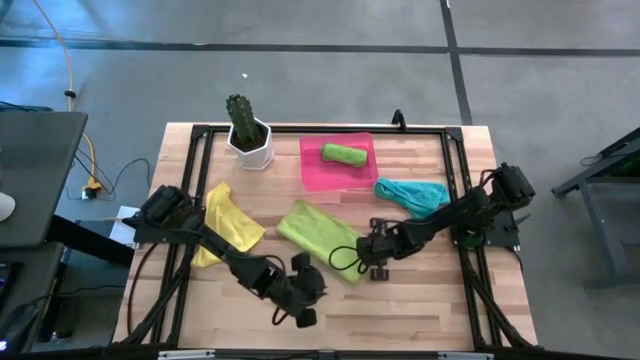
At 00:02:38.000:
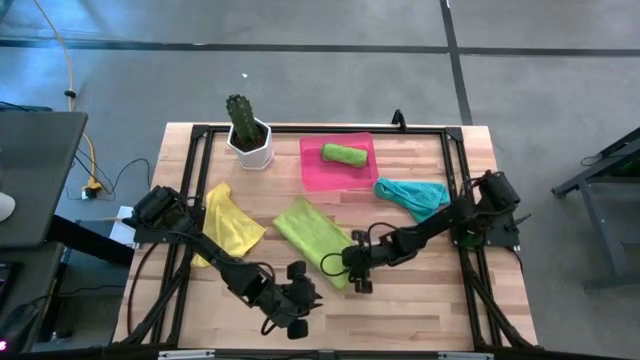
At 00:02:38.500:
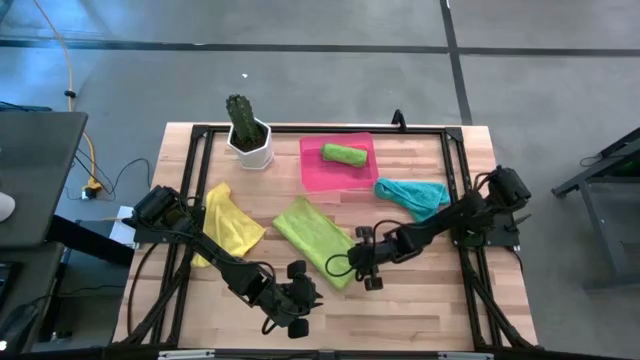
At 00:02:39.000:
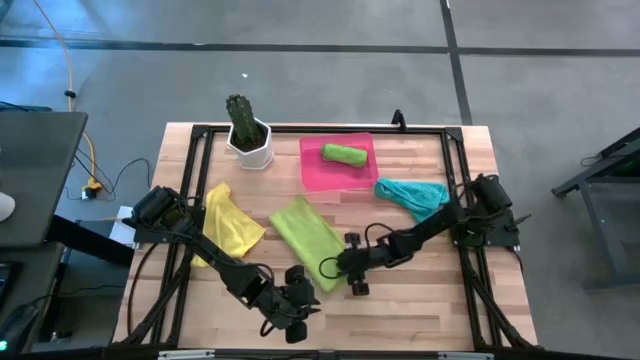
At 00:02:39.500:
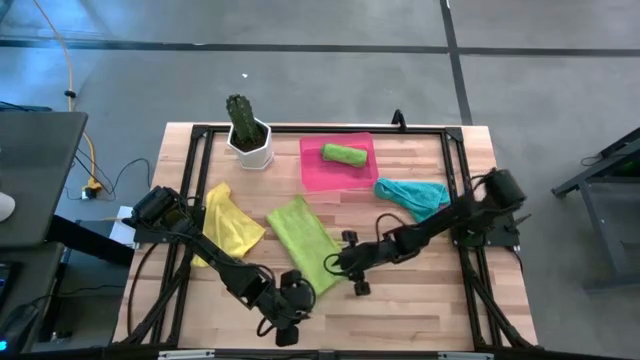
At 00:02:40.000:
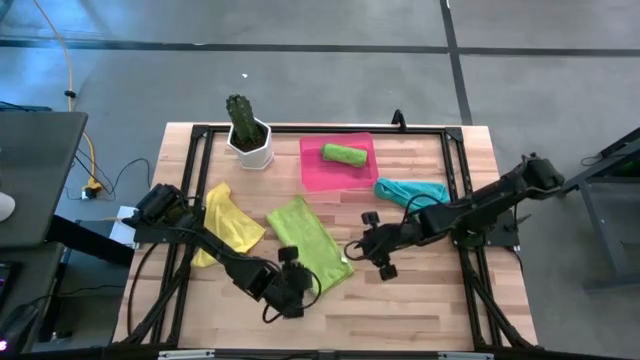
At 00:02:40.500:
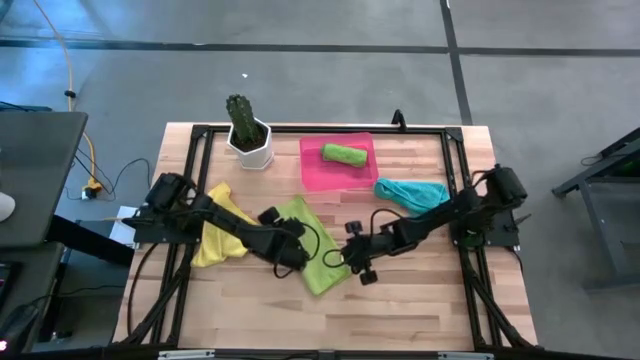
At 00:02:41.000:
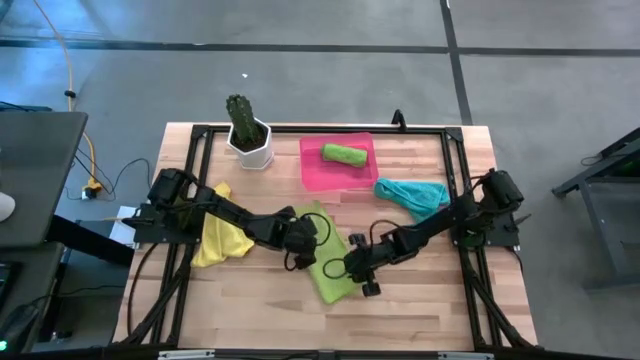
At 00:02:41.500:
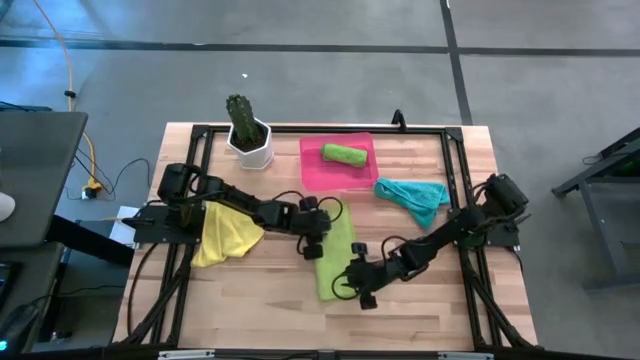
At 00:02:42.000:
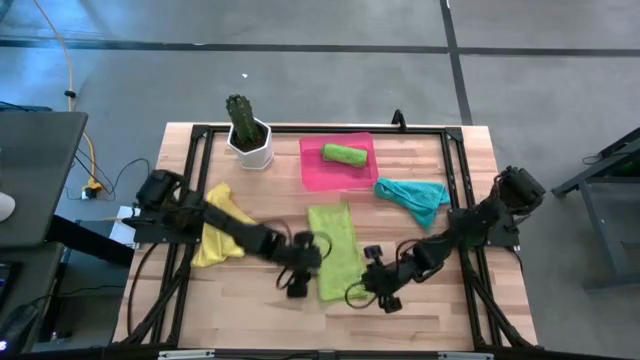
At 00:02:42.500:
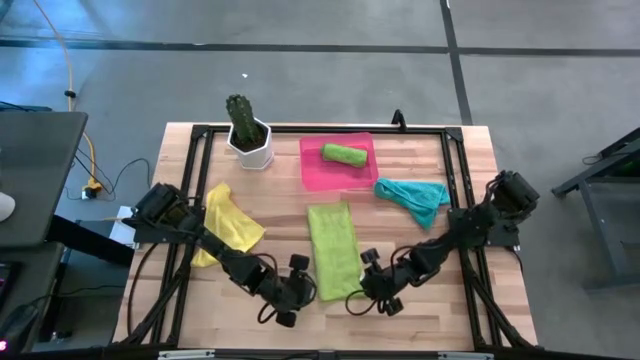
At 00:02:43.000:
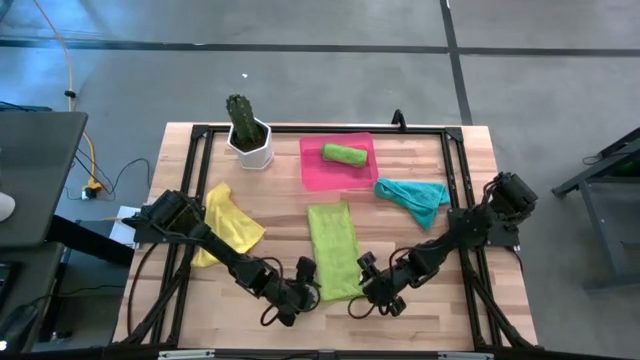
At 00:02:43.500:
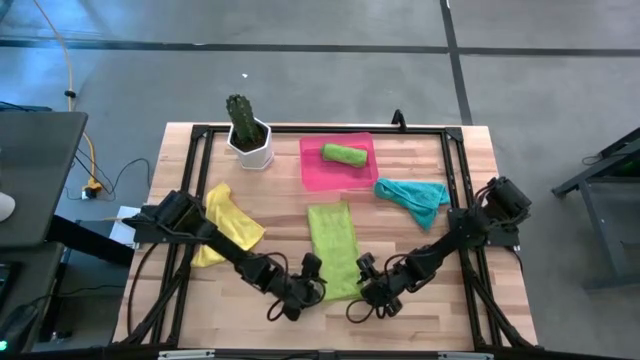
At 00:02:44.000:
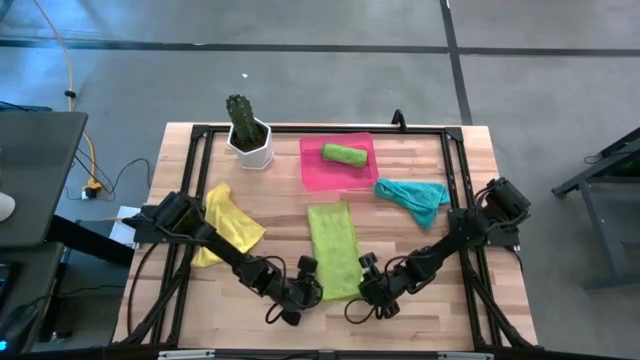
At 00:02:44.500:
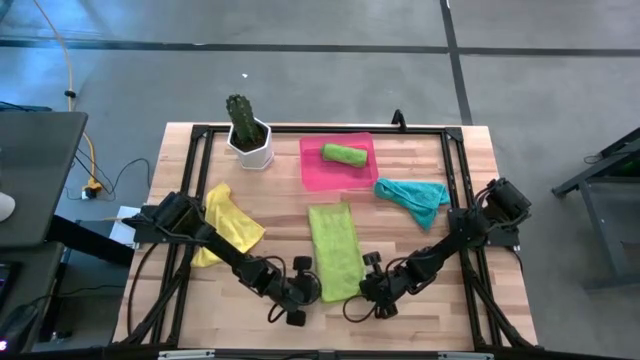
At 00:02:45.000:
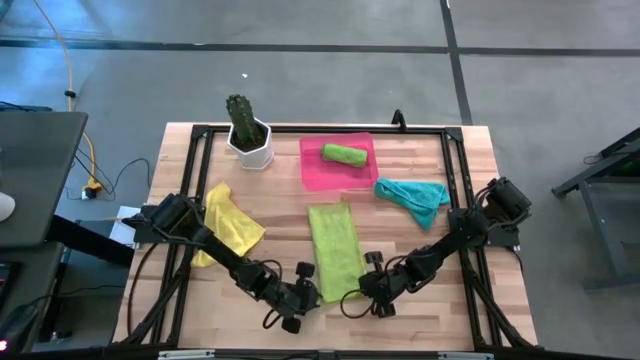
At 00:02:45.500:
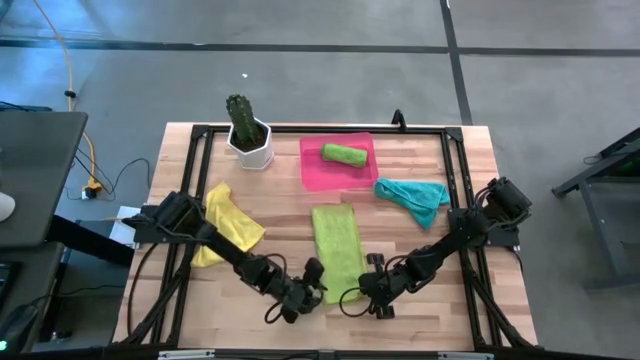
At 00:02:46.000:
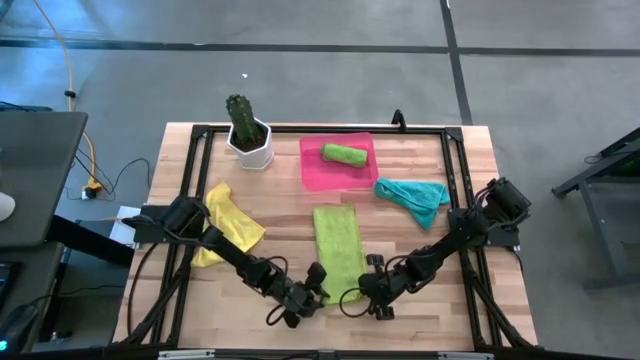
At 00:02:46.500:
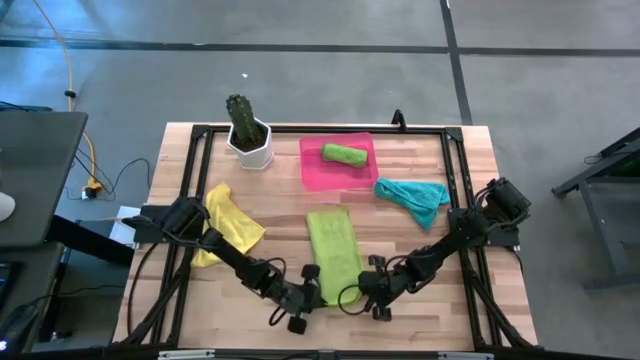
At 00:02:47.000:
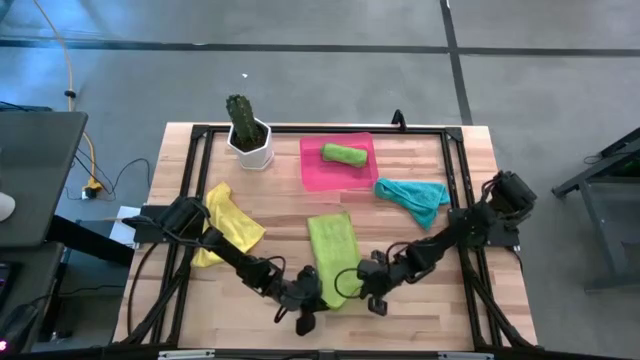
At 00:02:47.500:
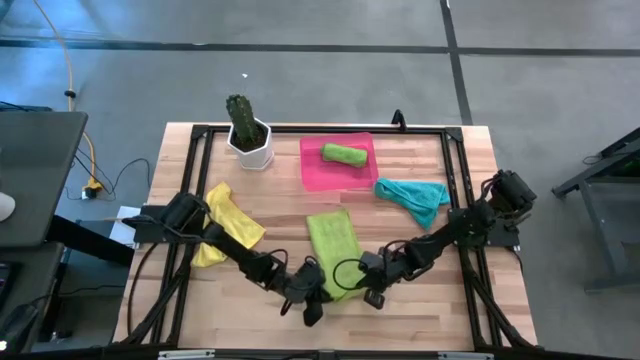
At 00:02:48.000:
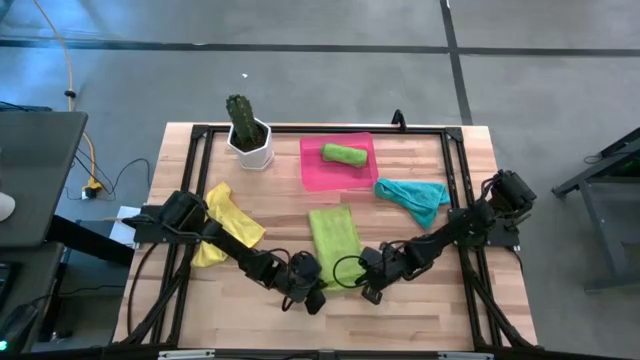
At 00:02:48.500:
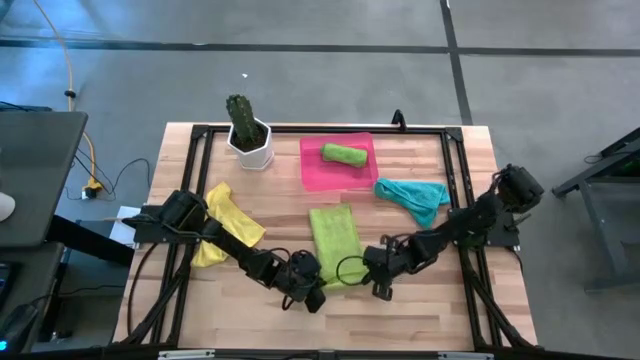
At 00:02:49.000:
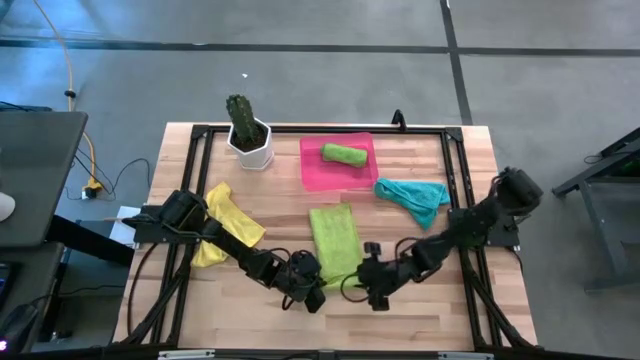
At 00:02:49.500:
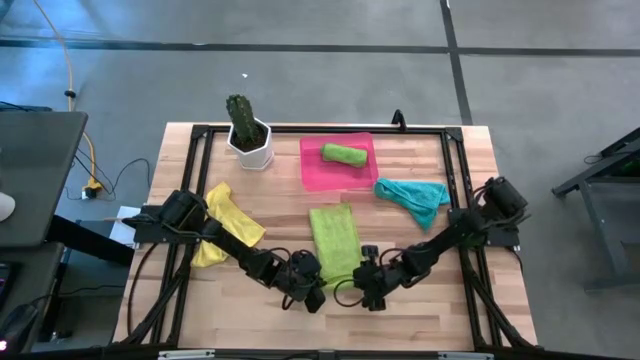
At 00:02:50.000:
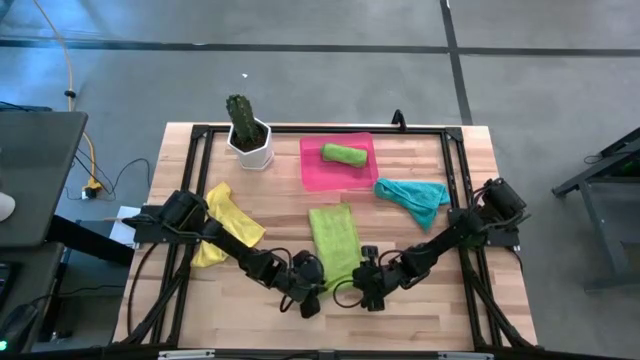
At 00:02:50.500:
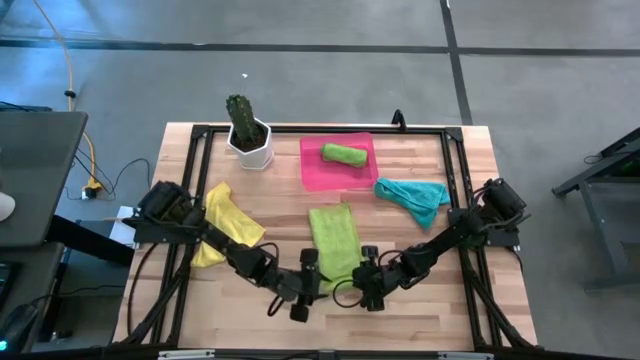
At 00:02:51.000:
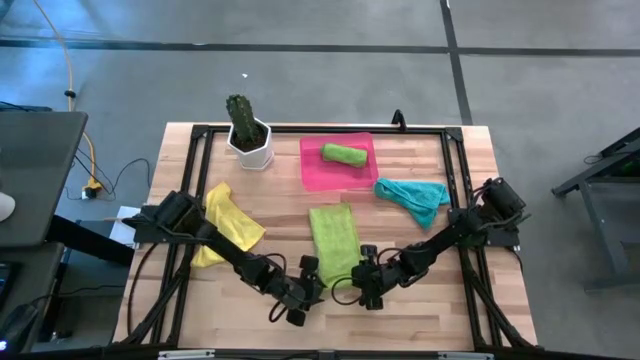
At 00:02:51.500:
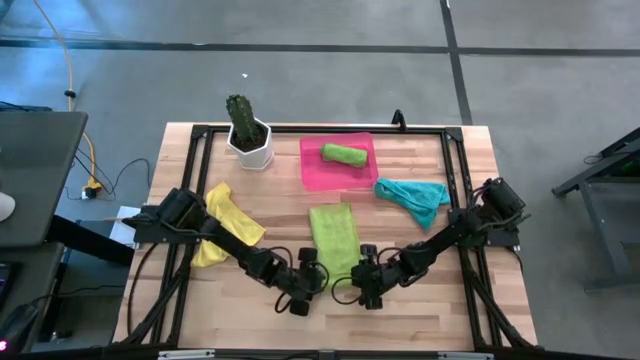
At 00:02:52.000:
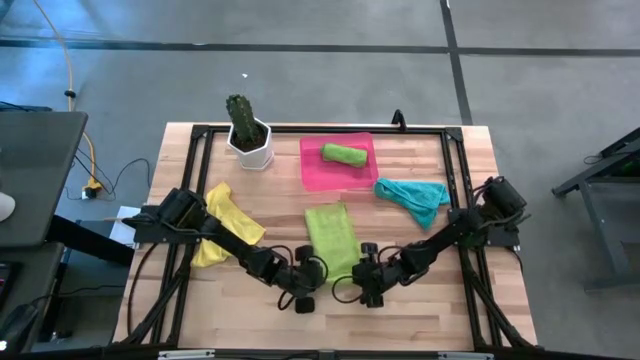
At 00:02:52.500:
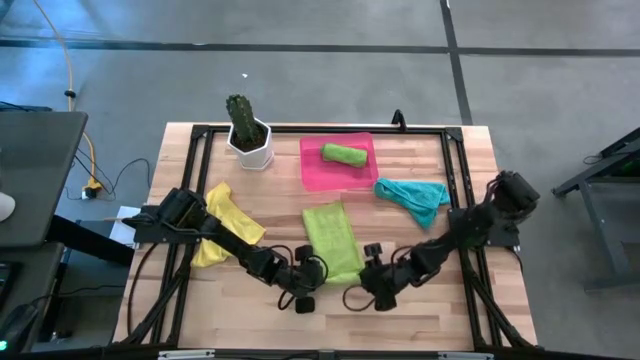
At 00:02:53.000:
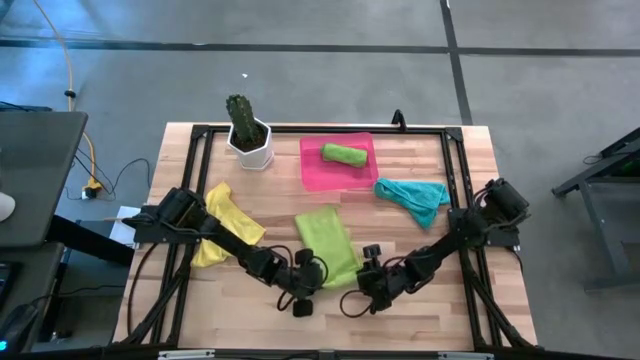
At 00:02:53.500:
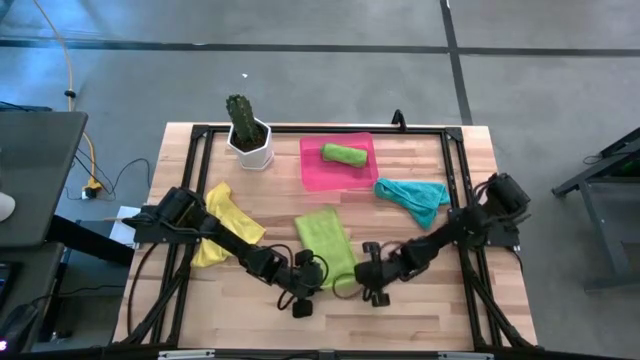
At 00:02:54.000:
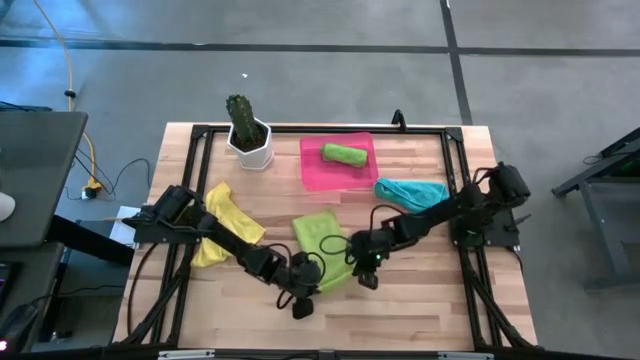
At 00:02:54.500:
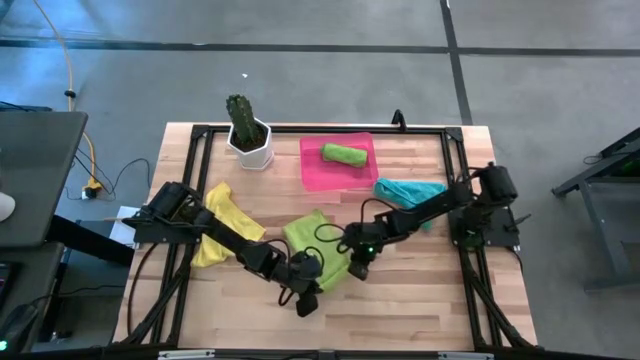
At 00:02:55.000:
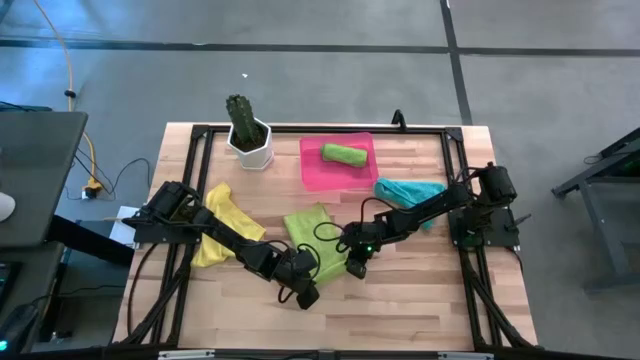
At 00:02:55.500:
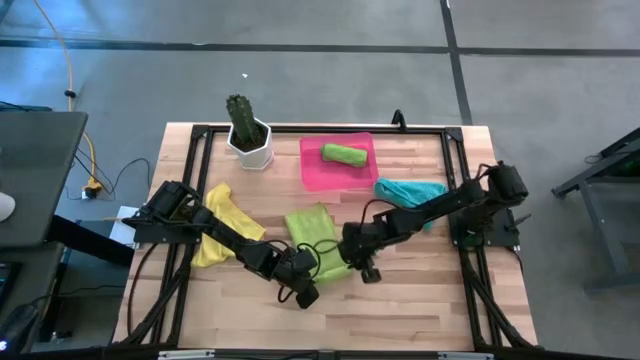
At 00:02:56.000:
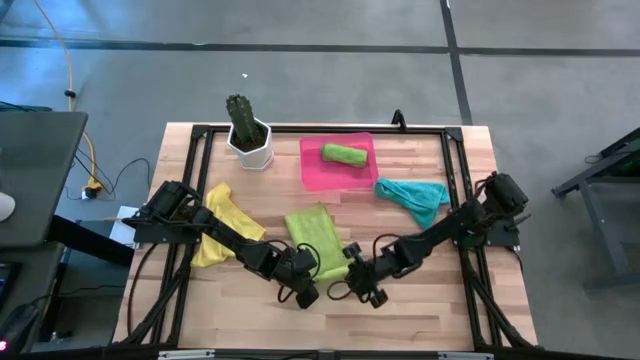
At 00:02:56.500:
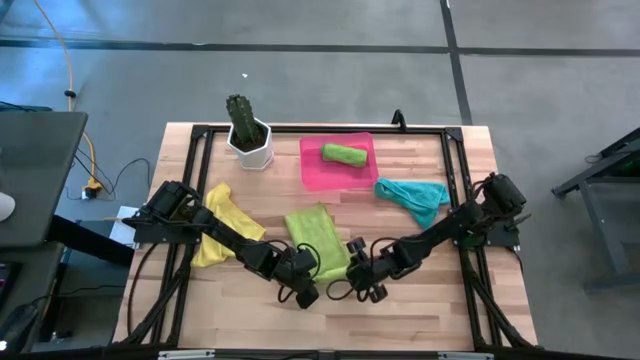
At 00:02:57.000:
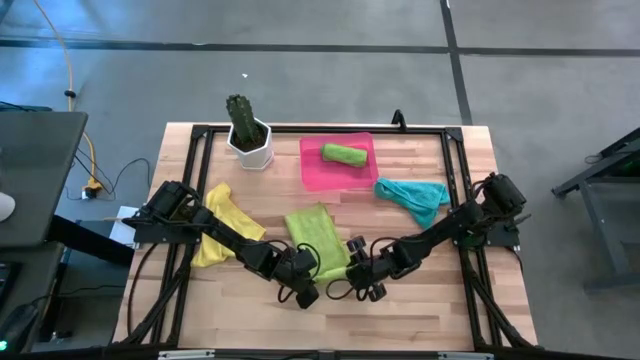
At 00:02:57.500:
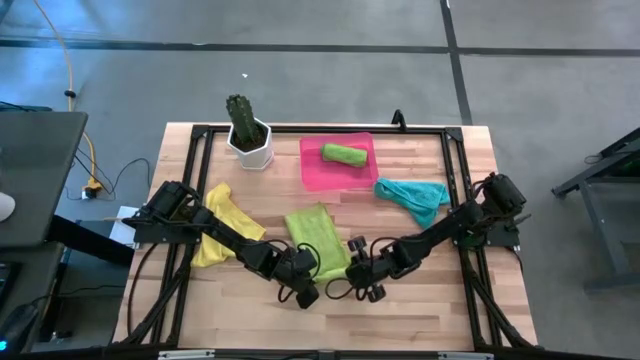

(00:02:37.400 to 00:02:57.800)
Task: Roll microfiber towels into tight, uniform cylinder then place into a basket
Roll the light green microfiber cloth

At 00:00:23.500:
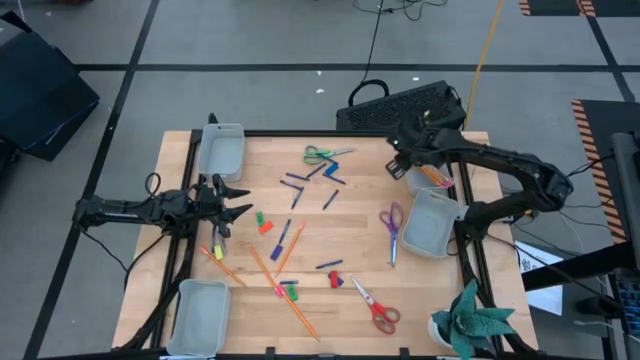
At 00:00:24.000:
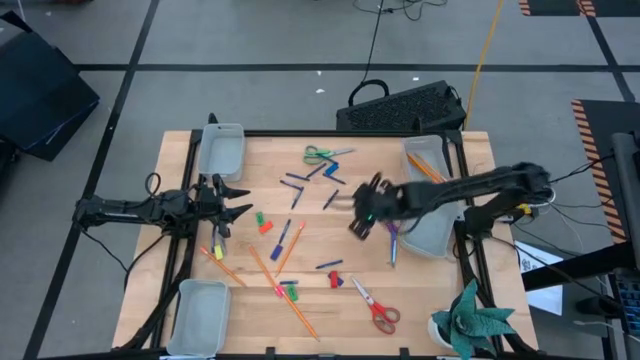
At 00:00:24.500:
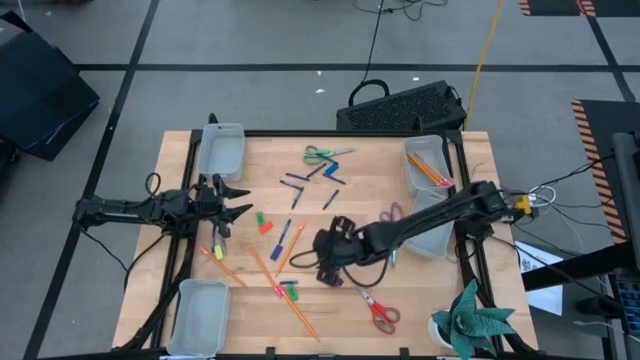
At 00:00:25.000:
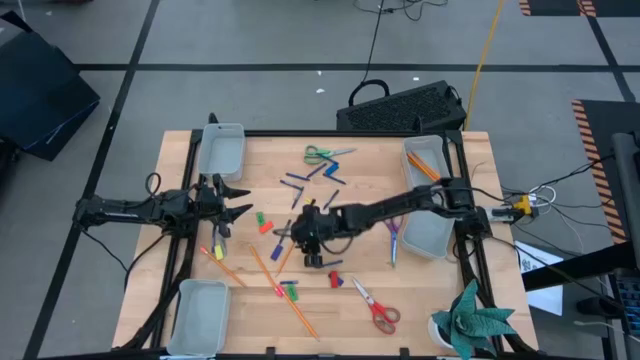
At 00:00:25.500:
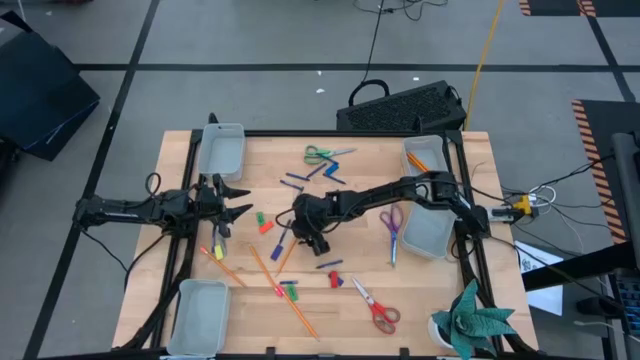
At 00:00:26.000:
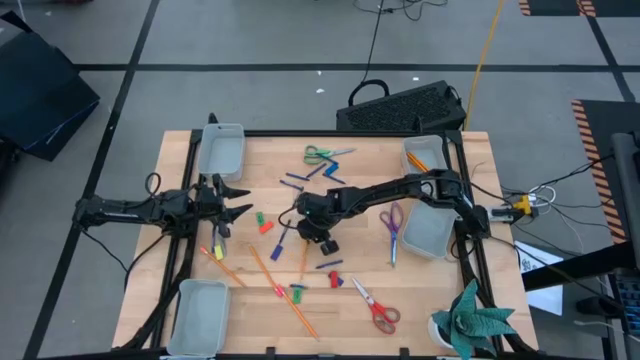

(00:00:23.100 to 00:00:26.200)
Task: Sort crayons/erasers/pens/pencils in bins
Put the orange pencil into the top right gray bin
